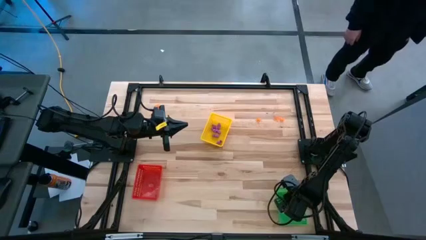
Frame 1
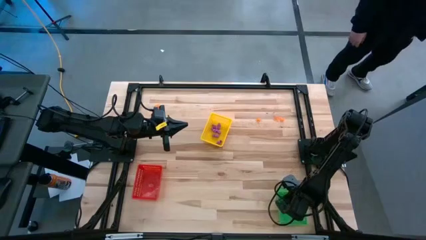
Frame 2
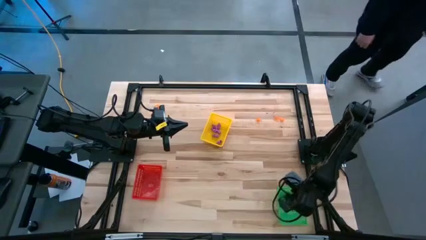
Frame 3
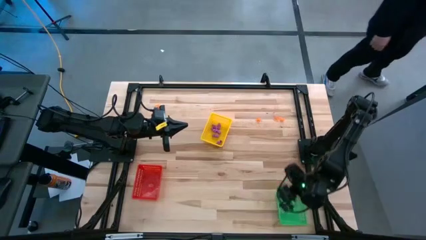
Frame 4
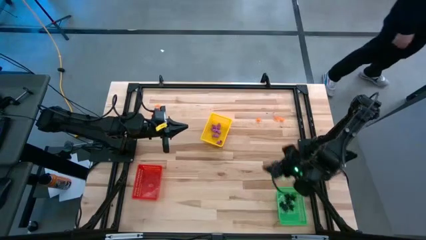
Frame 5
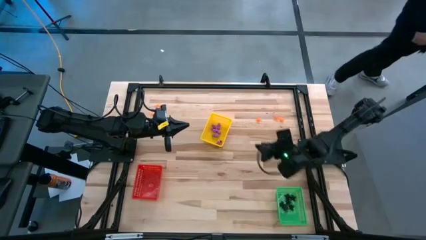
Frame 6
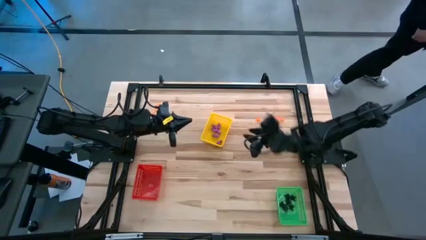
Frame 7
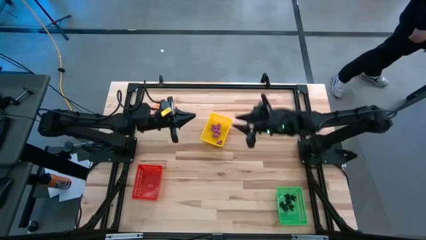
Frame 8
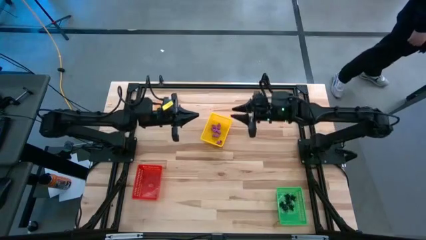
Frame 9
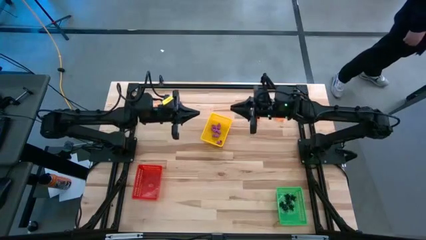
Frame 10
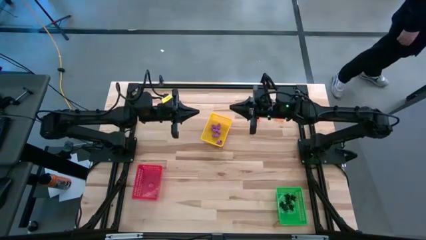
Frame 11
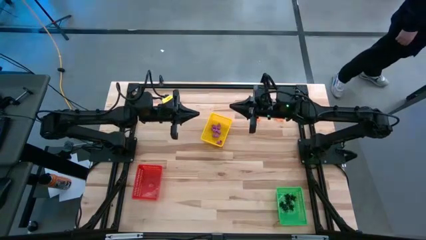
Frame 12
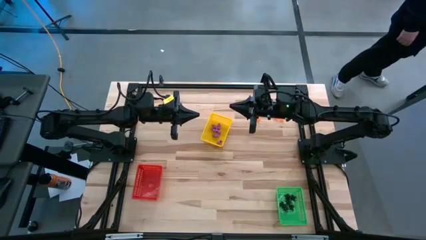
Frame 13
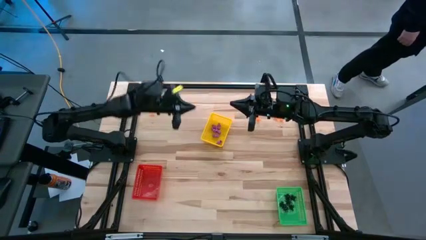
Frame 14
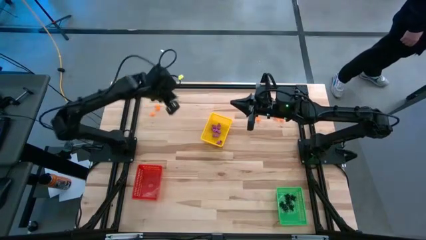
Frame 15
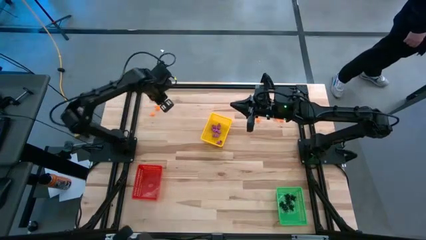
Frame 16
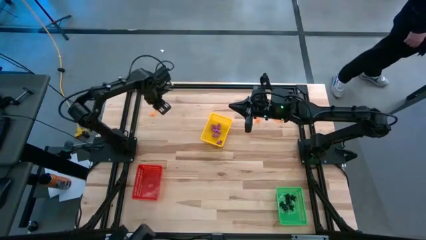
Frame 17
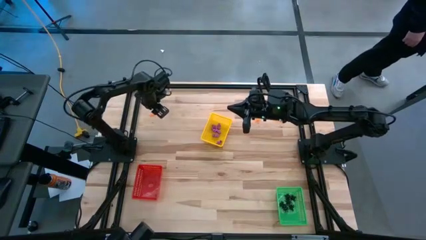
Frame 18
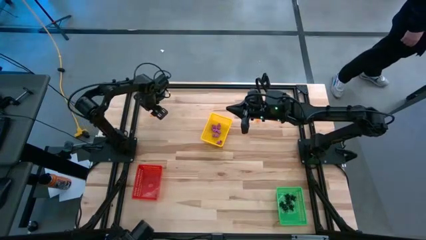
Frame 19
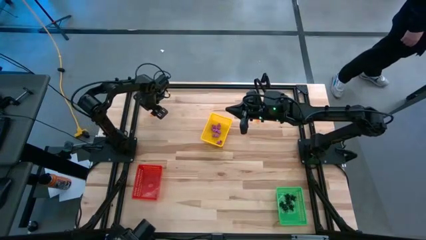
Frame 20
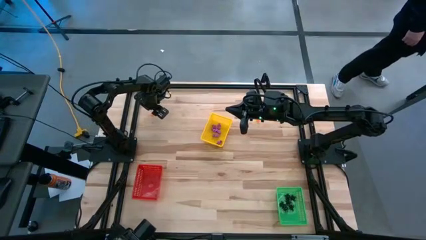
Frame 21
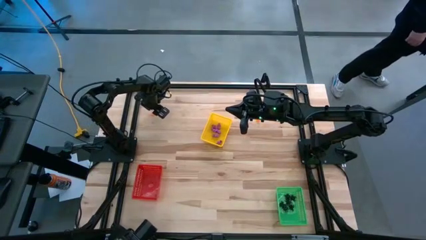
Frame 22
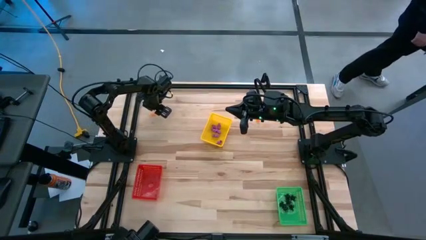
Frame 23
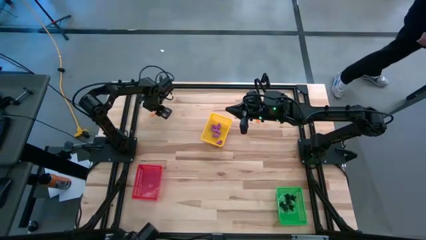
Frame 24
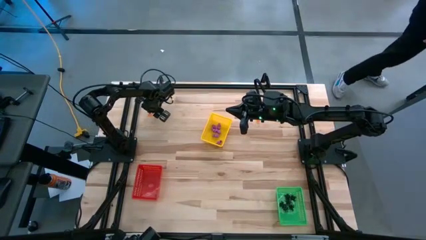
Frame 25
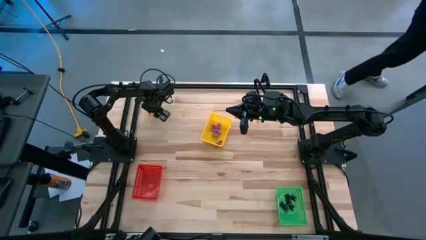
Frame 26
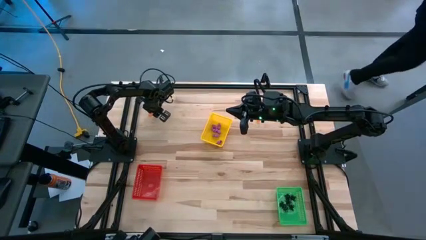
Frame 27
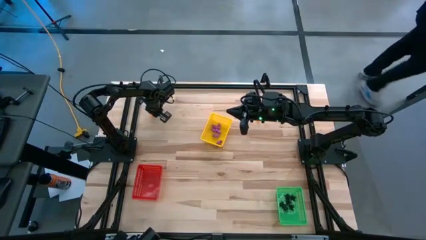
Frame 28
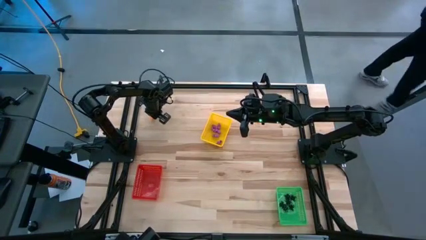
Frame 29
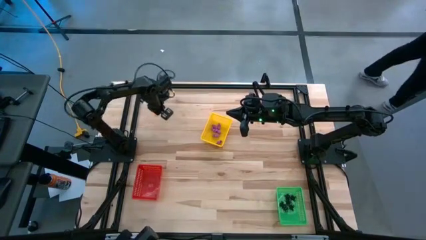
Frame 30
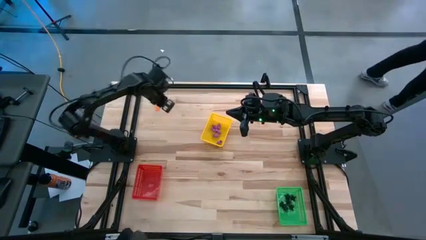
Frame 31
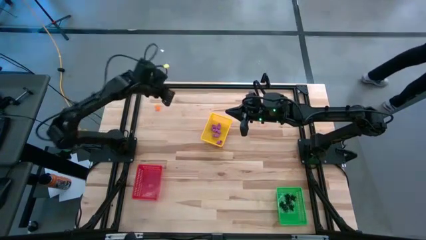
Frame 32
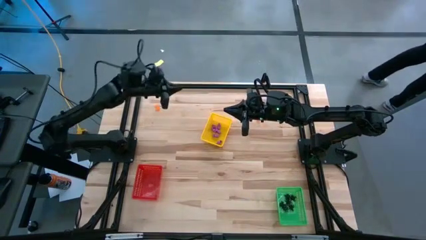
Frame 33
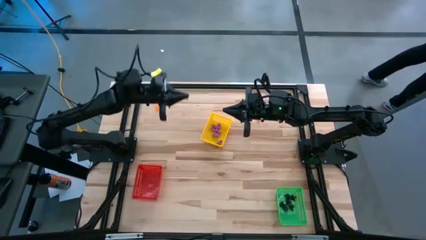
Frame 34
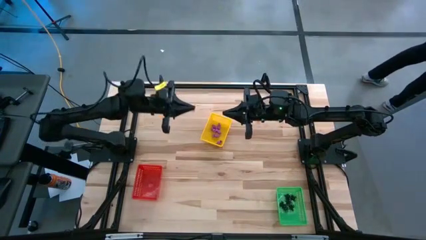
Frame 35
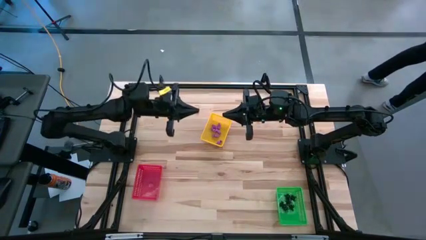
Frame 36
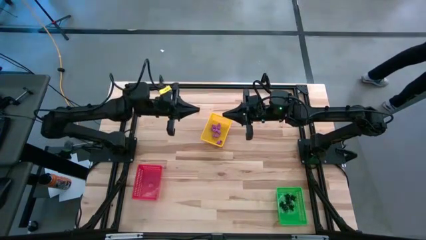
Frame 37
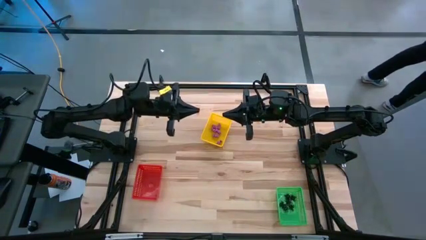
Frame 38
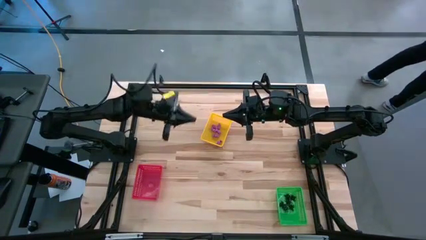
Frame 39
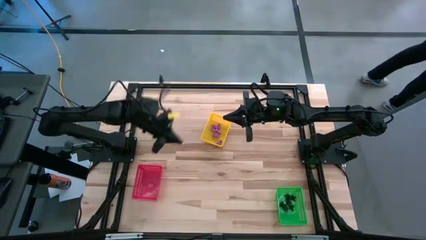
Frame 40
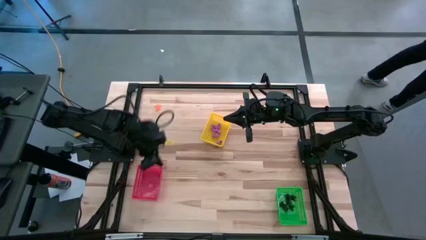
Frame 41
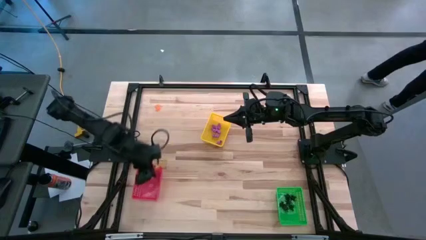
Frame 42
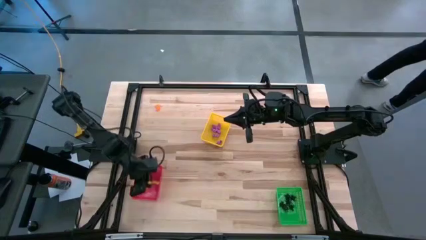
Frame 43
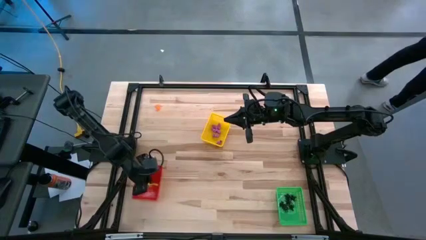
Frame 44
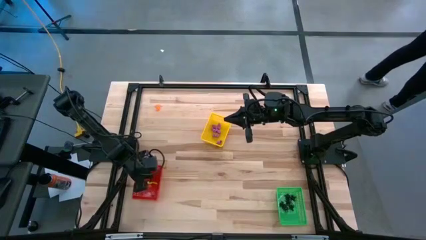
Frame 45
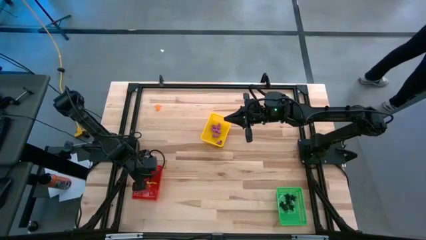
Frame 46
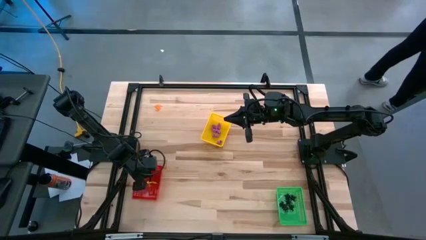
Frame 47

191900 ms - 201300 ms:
Task: Sort Halloween decoration
Put the orange spider toy into the red bin

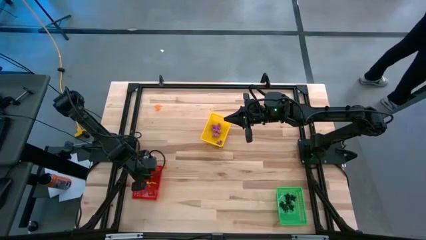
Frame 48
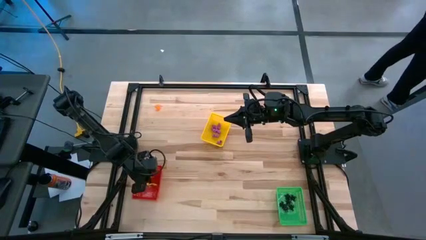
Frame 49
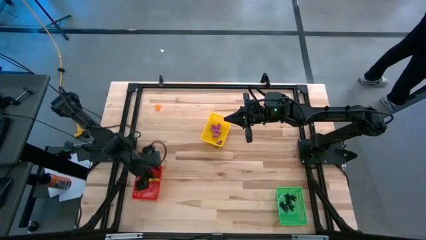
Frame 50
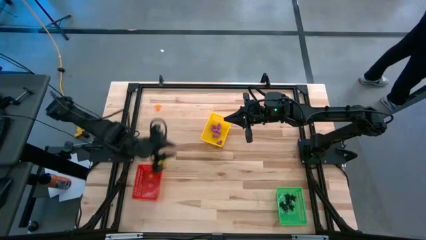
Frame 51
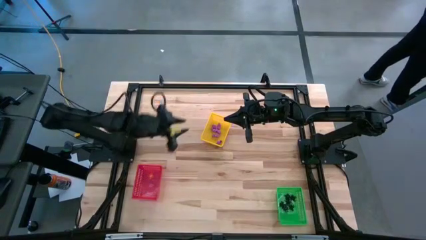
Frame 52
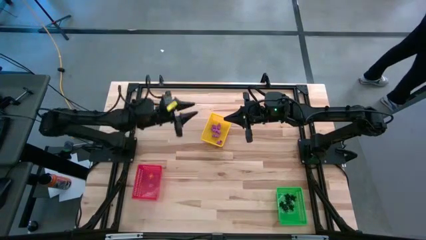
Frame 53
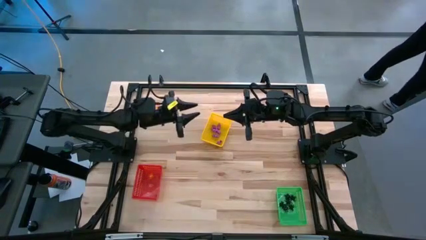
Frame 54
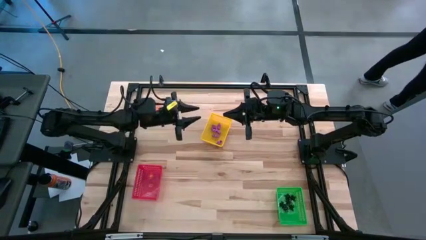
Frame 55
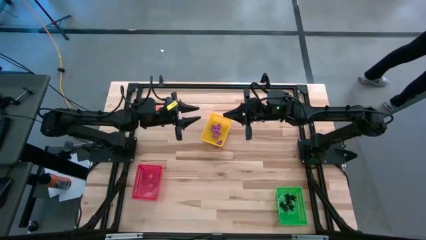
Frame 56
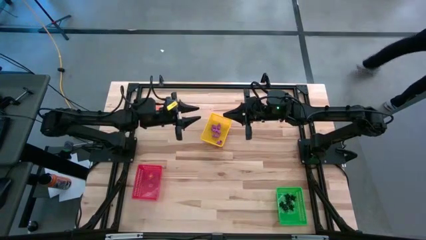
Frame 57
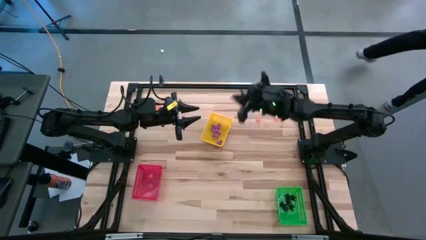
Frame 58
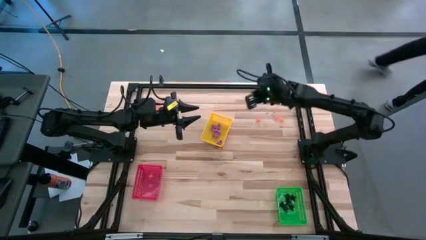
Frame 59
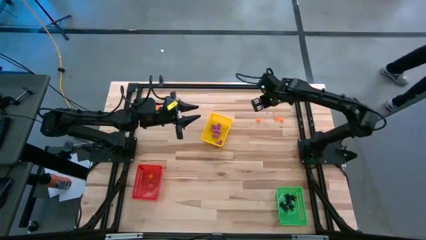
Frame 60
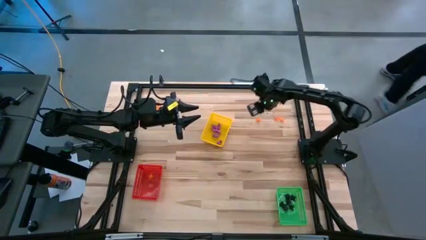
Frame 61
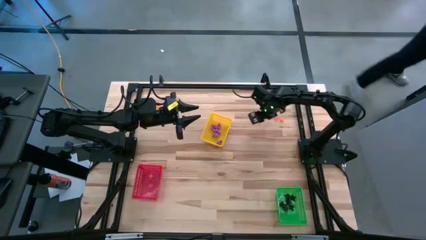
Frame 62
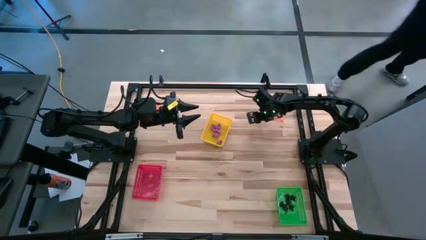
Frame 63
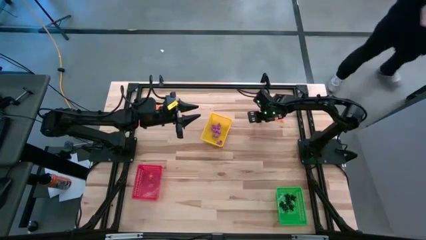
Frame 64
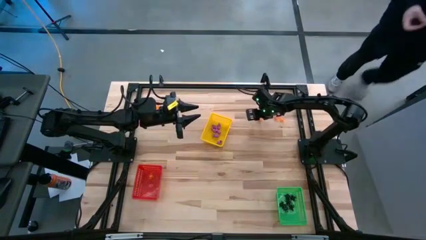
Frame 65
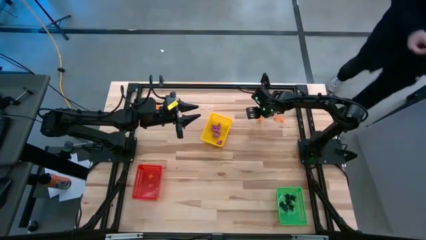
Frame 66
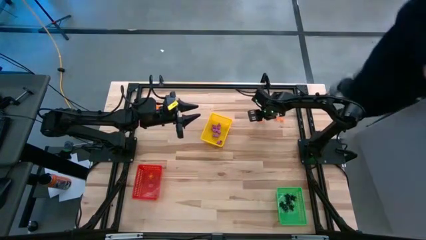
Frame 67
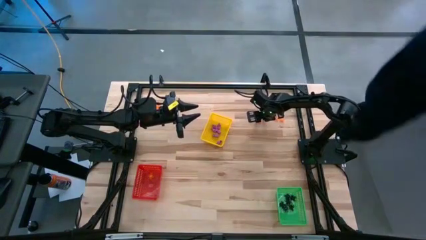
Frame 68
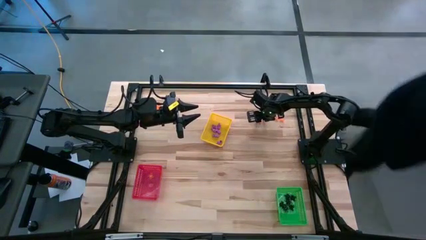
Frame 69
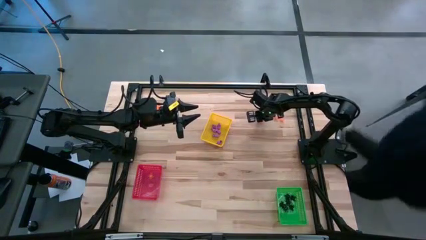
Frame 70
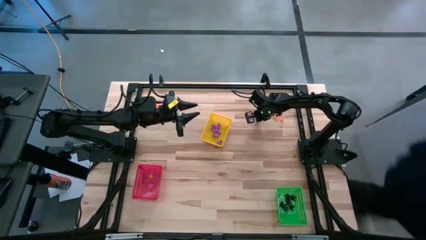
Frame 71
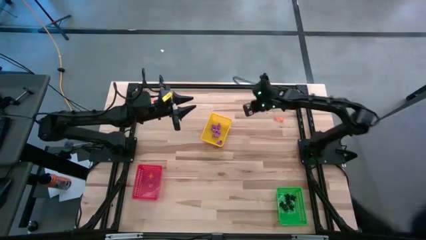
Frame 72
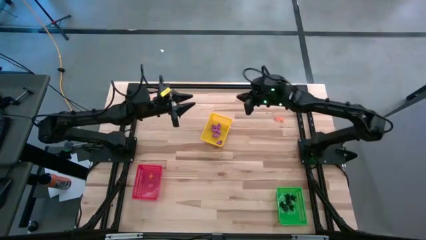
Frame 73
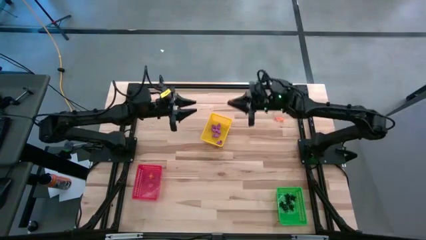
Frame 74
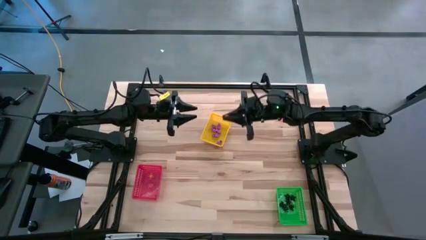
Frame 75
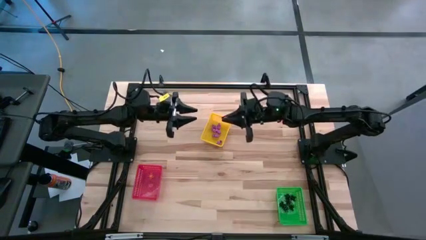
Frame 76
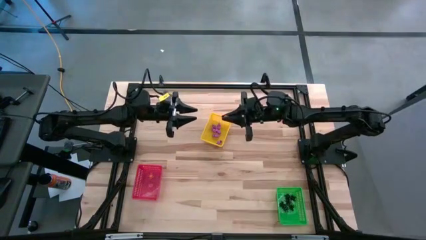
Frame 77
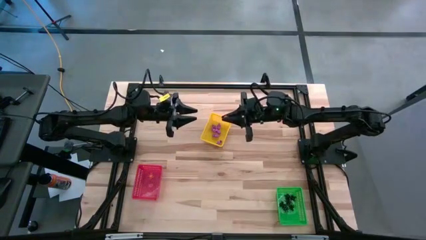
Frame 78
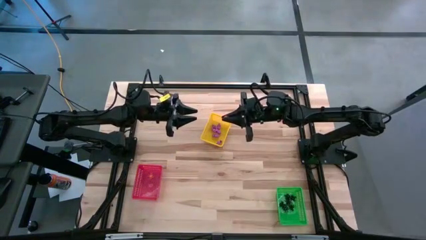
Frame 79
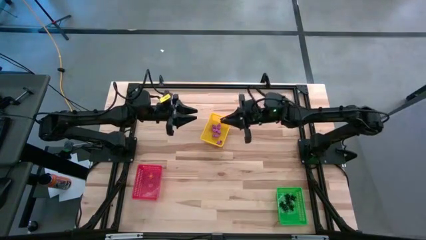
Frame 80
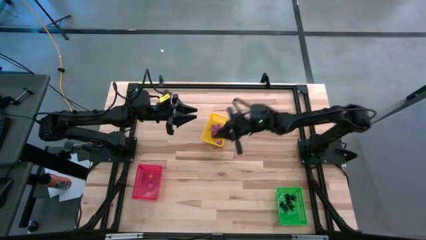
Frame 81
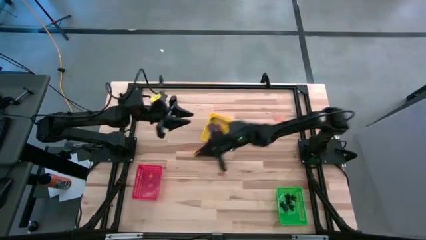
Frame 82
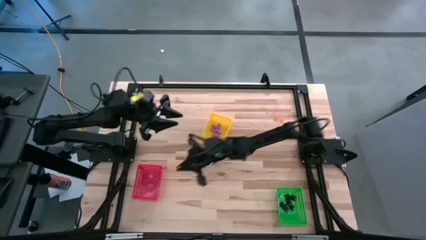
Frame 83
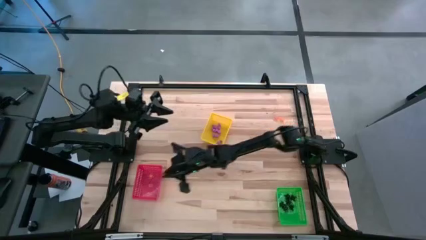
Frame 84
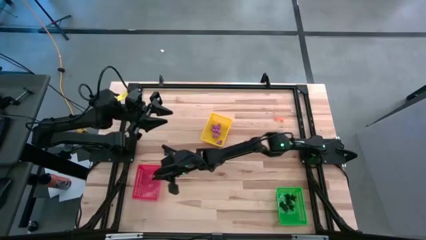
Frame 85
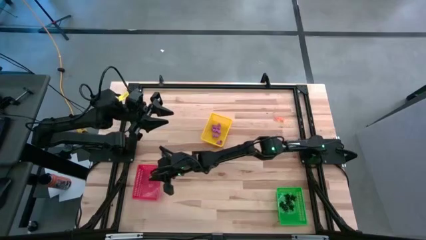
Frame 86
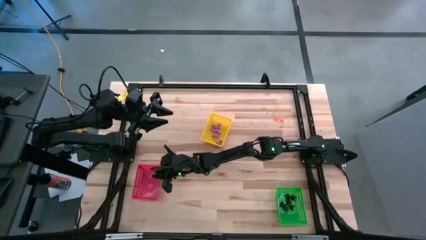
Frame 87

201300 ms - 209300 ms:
Put the orange spider toy into the red bin
